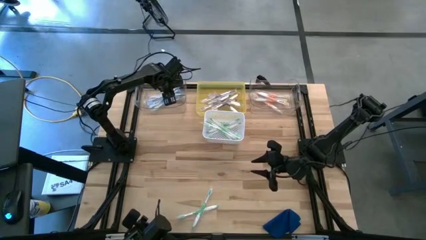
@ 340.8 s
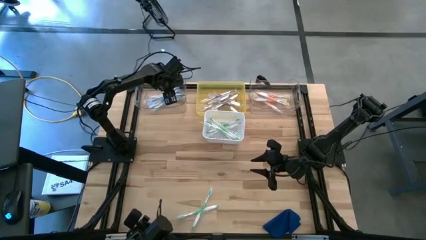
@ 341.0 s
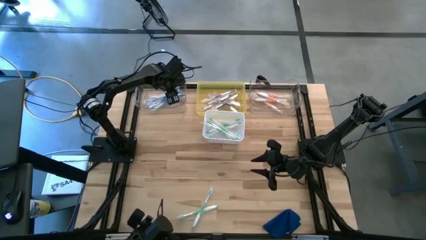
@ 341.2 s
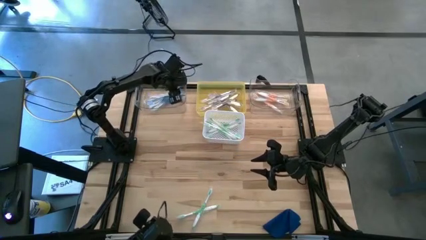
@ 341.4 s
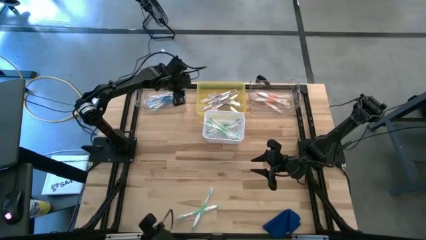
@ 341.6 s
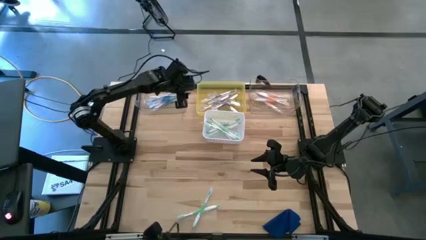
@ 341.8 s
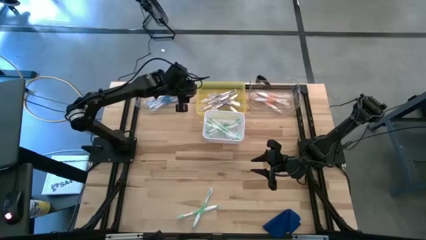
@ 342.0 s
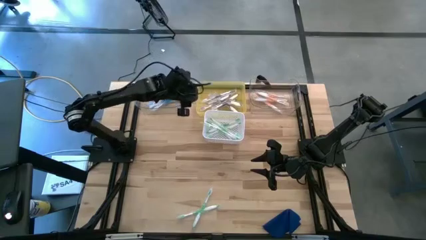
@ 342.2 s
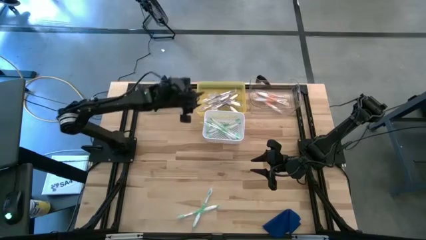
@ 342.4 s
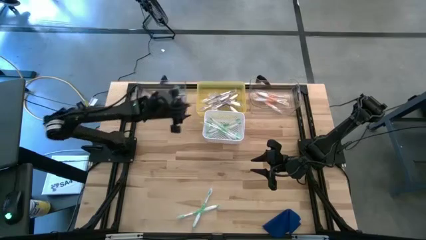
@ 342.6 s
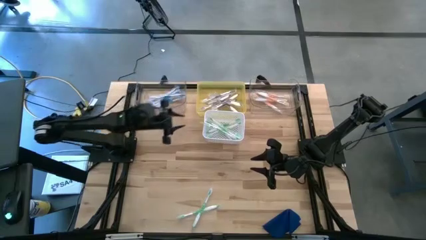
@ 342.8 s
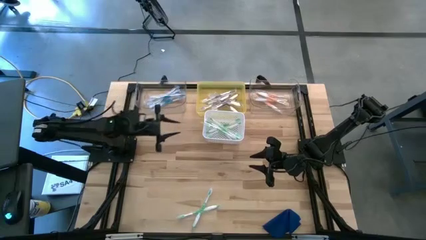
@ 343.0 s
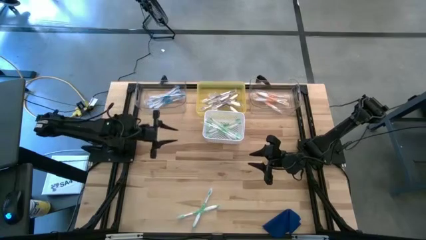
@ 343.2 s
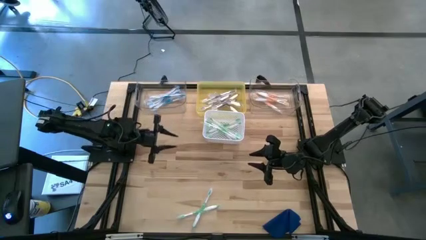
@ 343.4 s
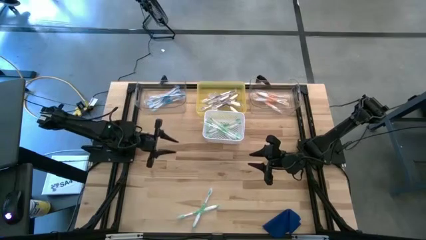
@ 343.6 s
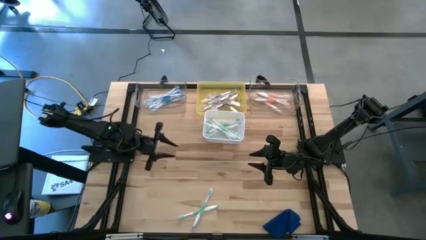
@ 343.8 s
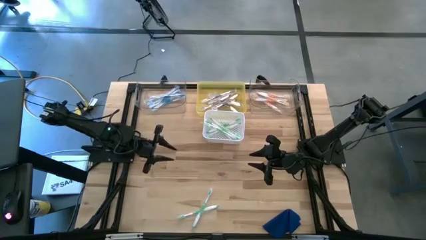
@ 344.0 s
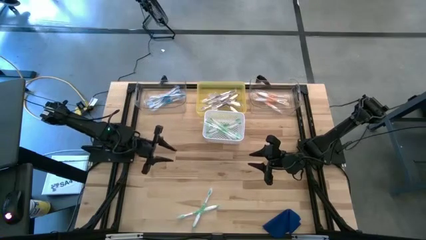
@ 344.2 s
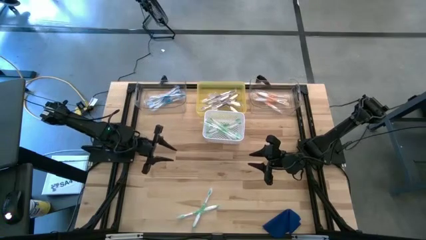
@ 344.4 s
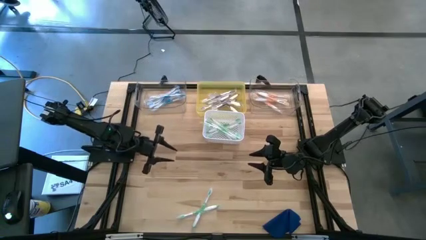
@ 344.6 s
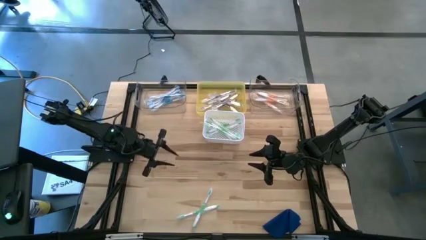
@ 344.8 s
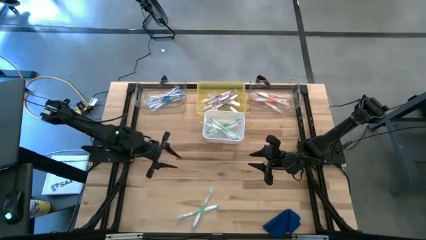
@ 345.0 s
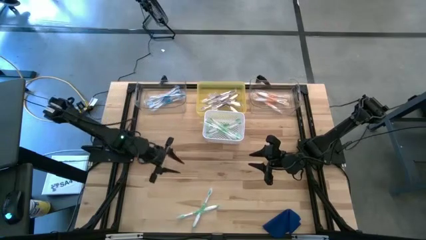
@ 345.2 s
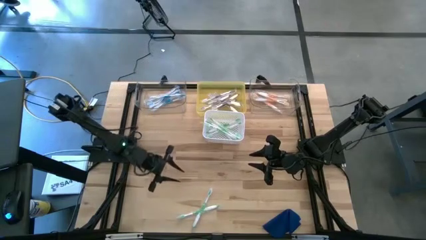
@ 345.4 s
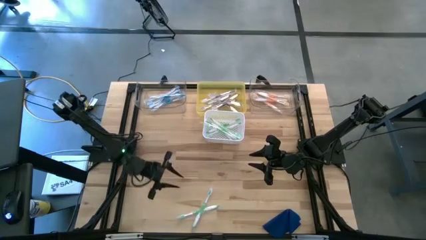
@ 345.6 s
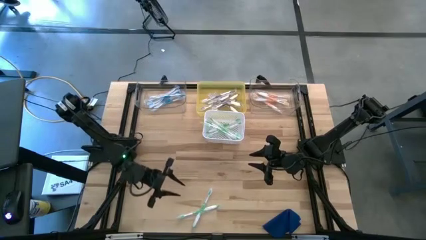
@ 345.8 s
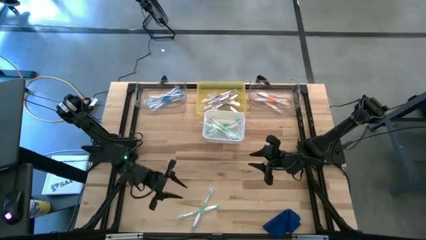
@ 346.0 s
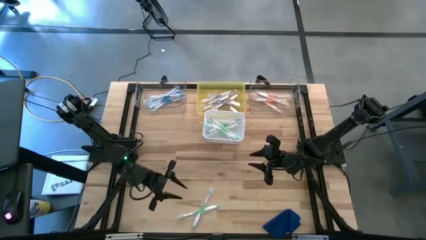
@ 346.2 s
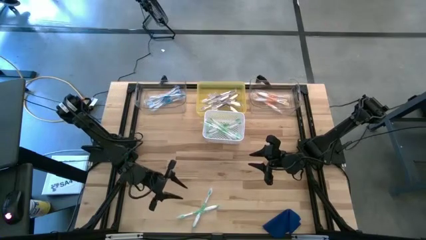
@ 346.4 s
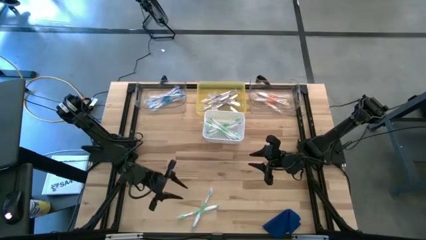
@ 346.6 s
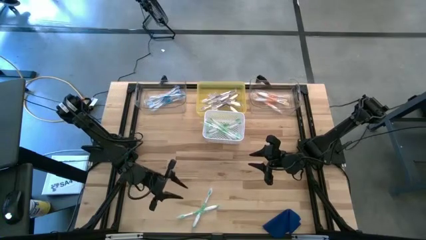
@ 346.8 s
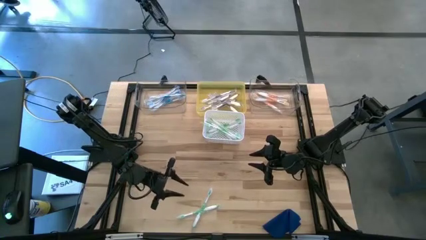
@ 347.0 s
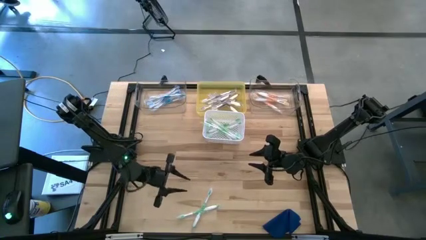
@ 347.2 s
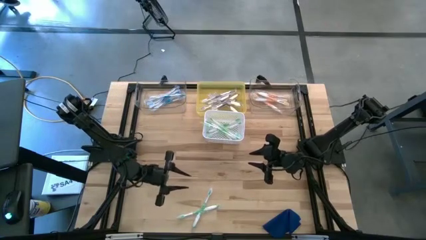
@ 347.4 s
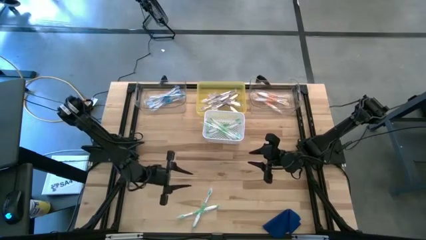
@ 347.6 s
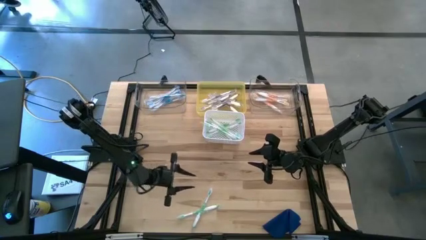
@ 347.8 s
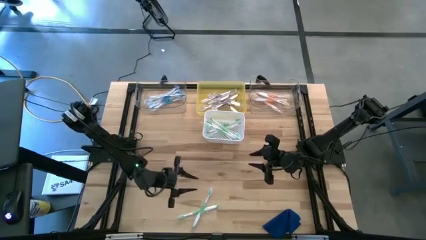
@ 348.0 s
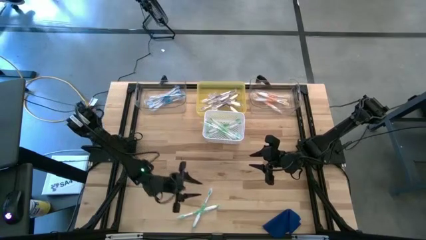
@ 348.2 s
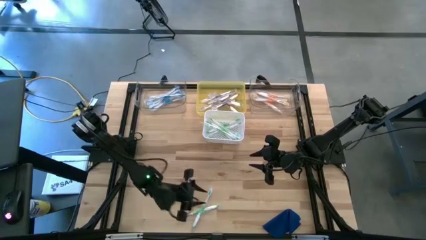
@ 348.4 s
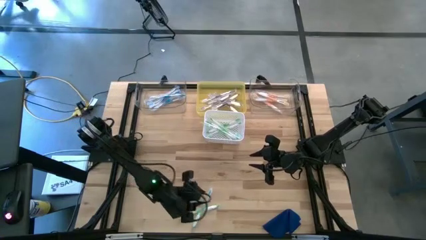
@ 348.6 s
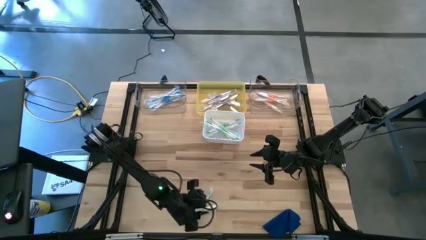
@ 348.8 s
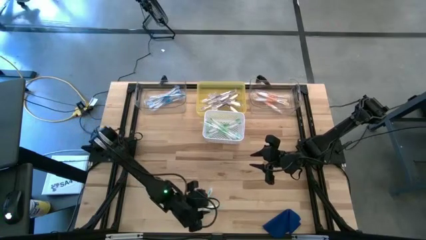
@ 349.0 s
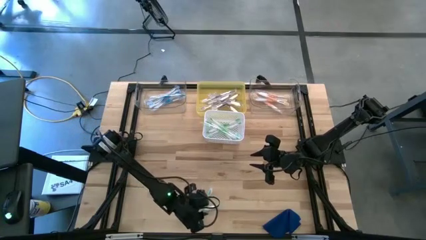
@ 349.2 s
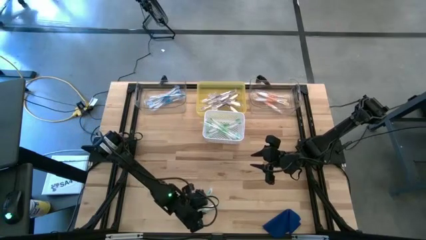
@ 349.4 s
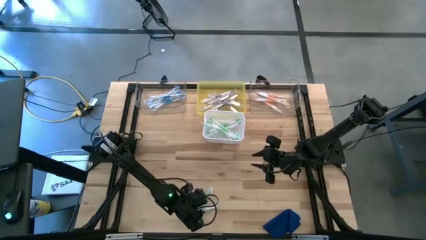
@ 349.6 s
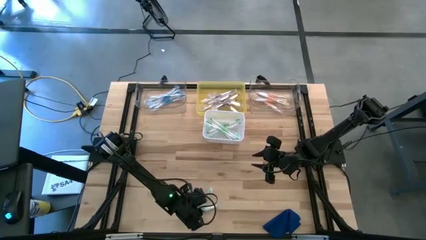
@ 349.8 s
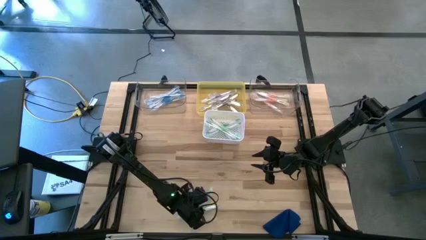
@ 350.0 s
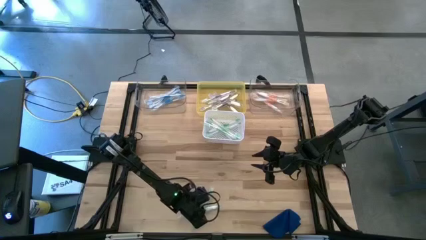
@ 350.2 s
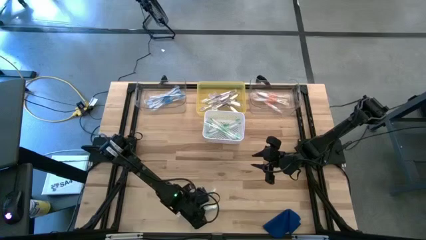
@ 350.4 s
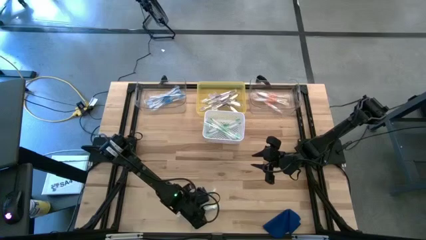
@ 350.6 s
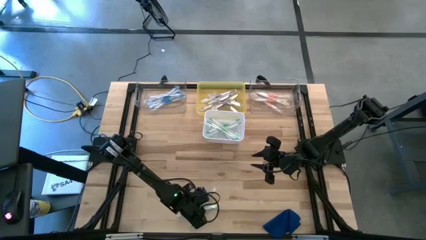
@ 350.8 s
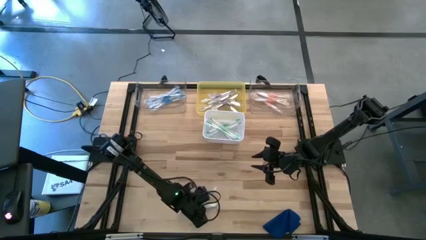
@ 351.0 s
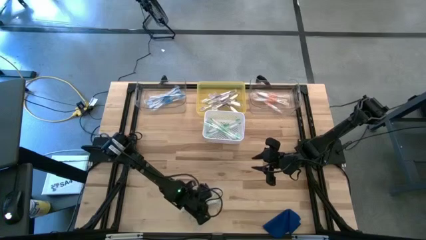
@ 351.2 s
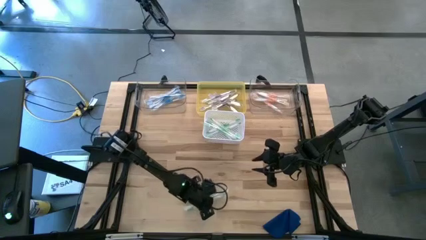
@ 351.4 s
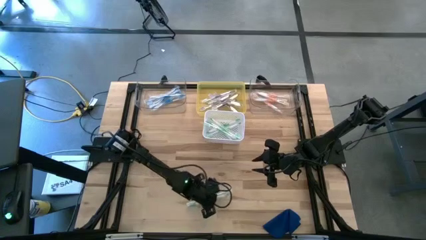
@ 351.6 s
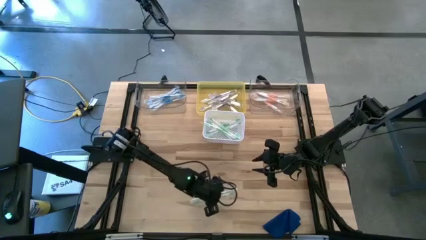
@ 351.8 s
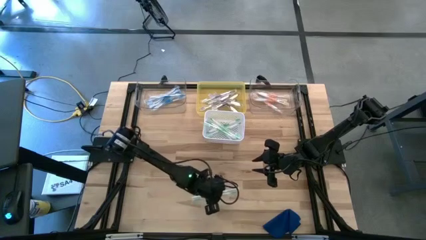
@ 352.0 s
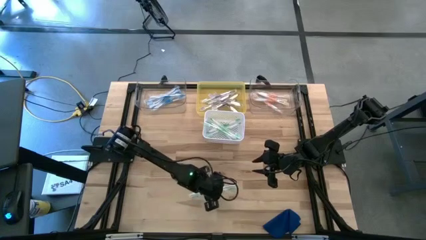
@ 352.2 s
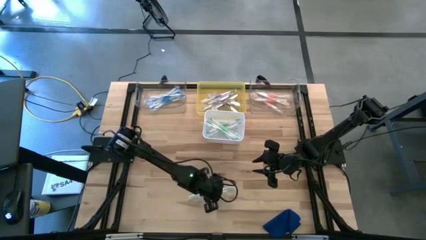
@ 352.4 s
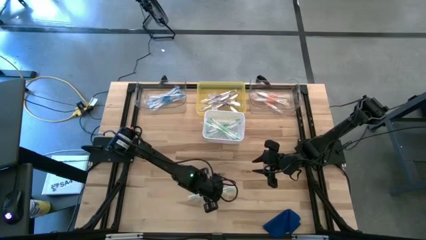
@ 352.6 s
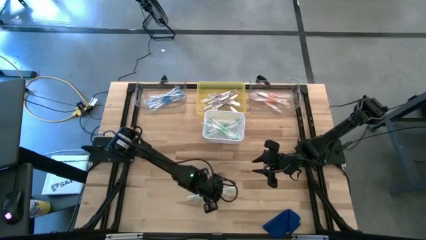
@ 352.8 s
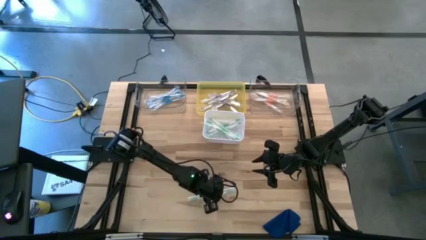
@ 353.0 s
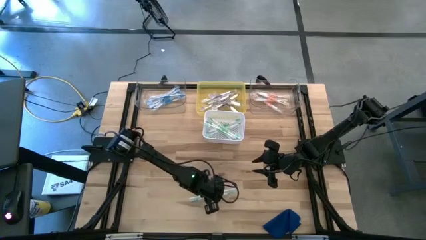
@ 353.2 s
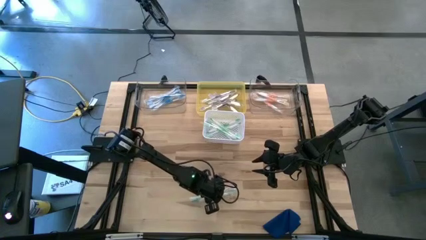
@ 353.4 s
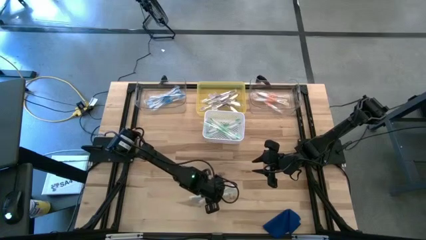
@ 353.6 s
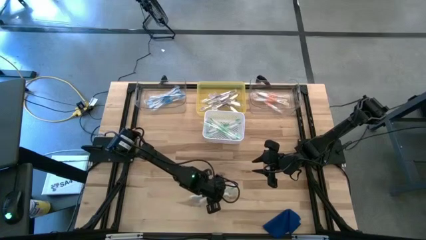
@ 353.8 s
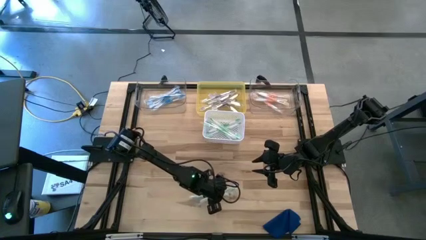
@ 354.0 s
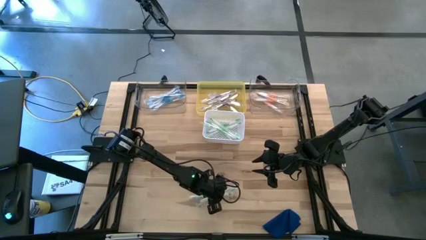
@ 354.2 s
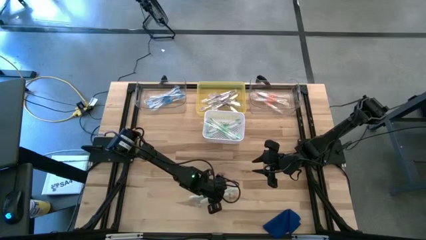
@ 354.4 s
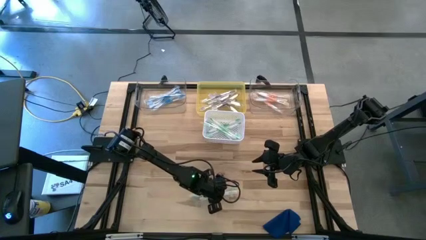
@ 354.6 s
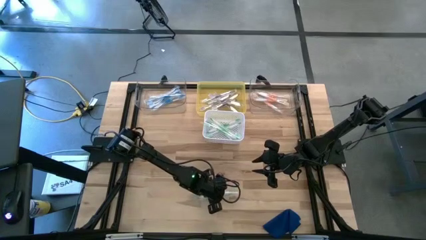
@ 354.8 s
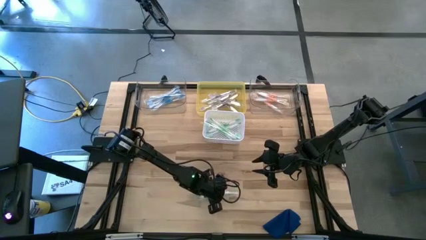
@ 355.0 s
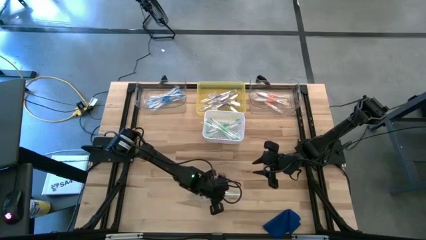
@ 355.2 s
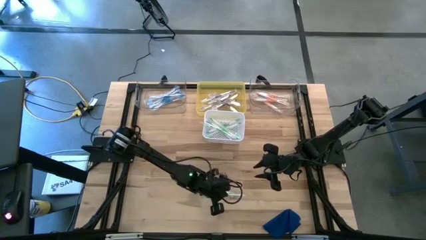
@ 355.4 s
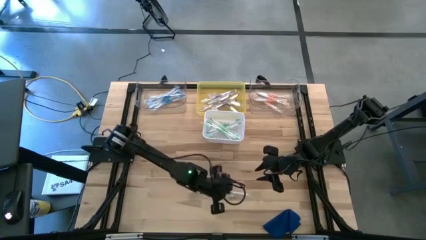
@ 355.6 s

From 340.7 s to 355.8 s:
Task: Pick & Place Toothbrushes
Put the green toothbrush into the white bin

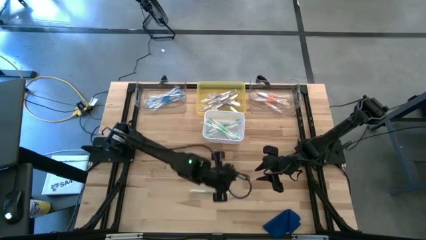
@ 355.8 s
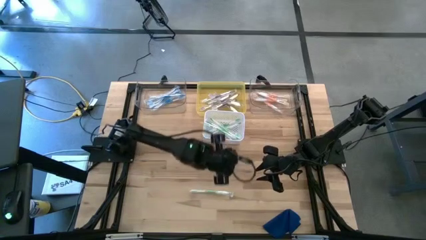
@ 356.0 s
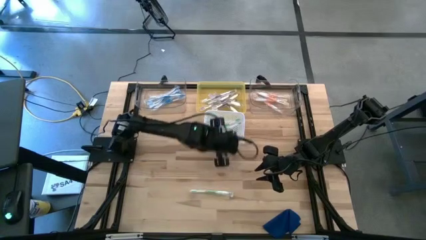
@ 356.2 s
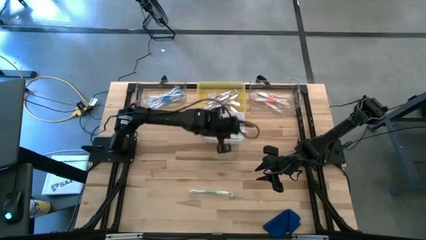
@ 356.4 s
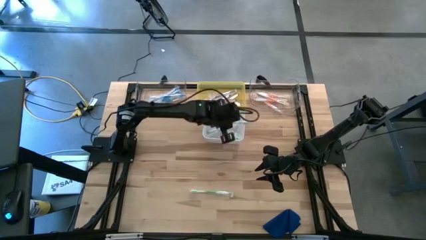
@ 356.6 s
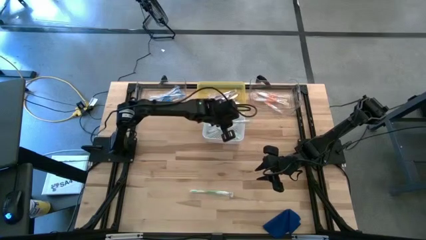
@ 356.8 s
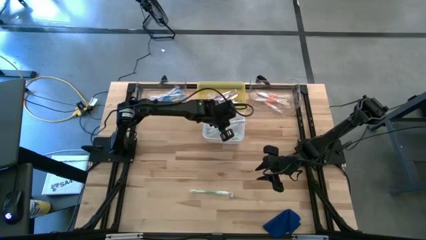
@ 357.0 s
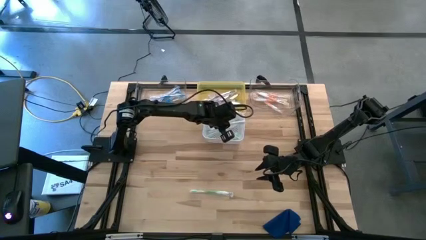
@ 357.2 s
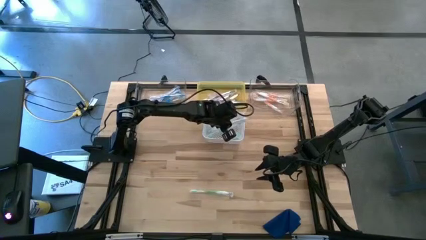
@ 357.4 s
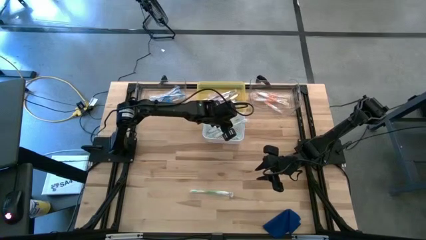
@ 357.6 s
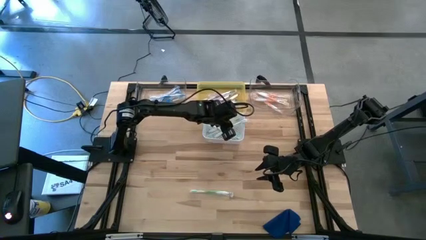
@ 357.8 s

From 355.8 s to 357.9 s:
Put the green toothbrush into the white bin
